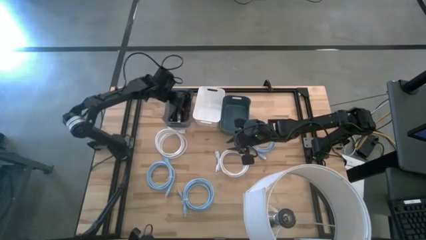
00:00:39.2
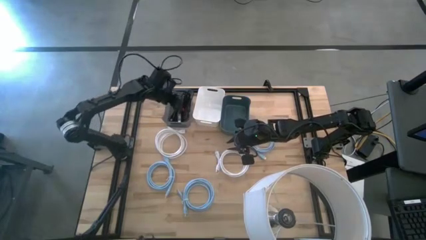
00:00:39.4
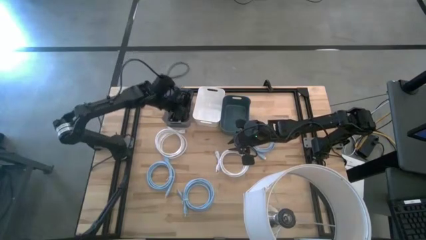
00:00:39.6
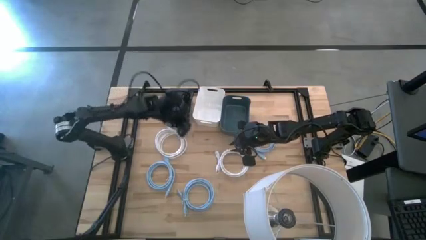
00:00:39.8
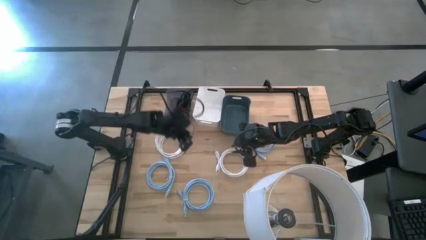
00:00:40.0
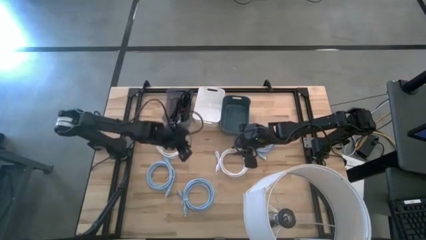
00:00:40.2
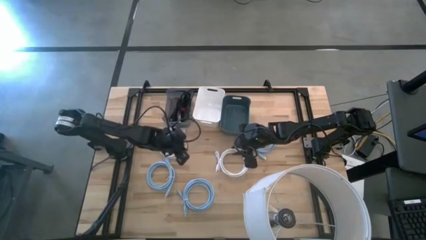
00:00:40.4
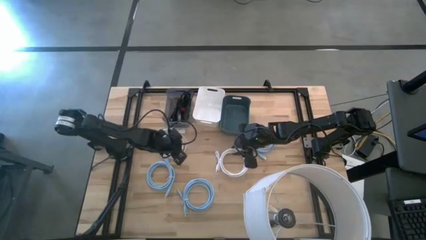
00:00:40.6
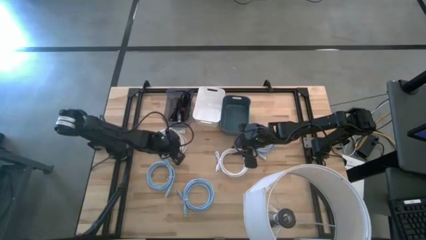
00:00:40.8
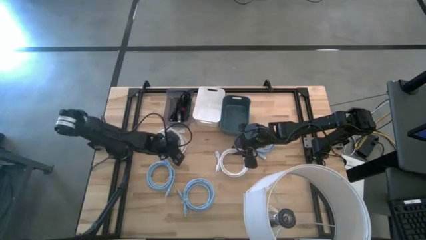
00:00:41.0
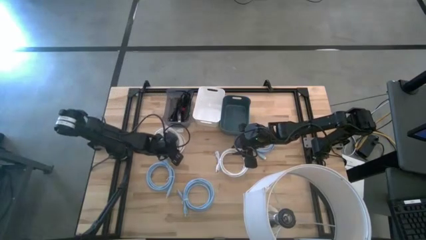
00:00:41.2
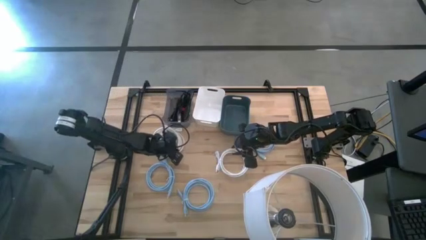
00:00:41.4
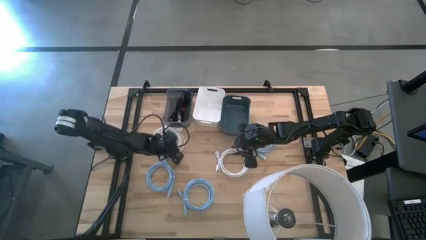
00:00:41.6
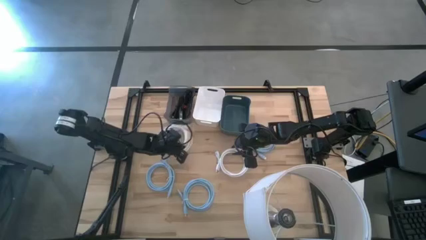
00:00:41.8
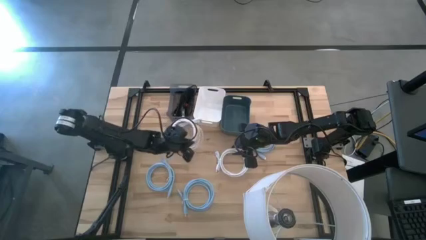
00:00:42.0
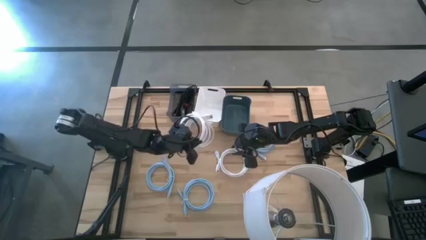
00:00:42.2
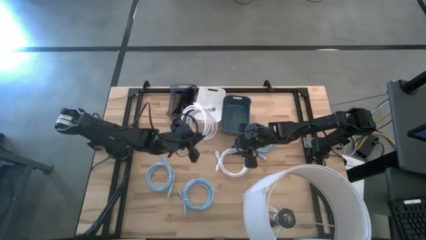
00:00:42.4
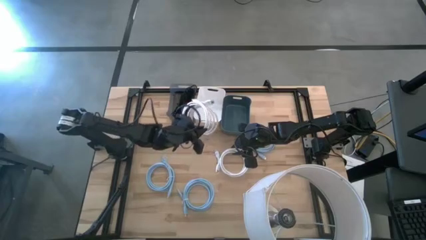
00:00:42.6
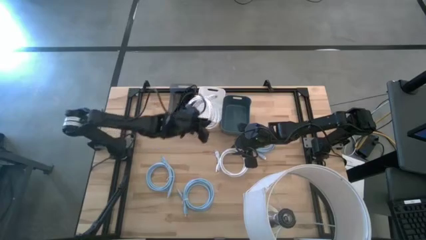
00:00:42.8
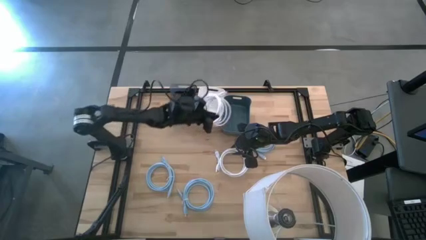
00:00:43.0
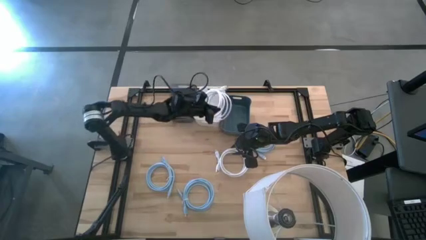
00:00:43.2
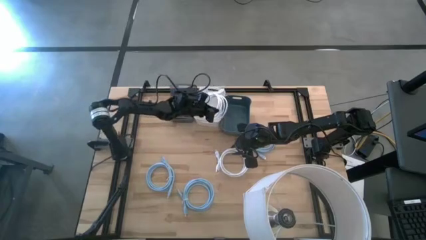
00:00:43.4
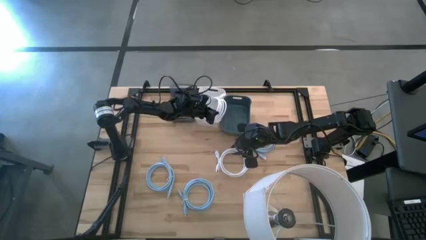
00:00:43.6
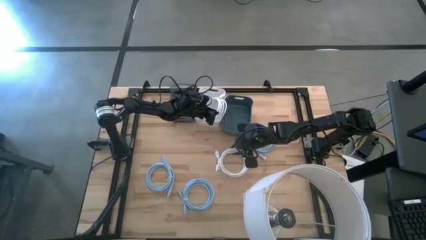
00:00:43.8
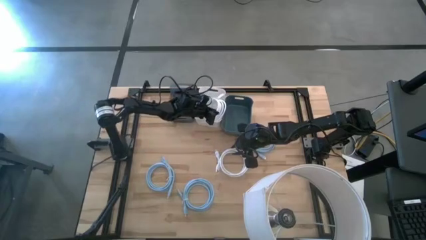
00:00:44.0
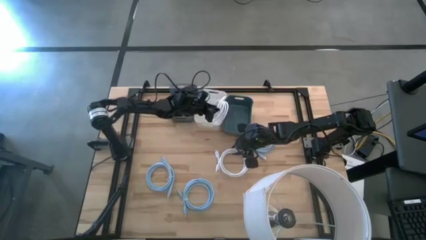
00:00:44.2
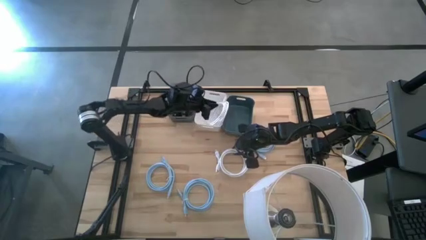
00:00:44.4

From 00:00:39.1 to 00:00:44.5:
Task: Pick & Place USB Port
Put the left white HDMI cable into the white bin

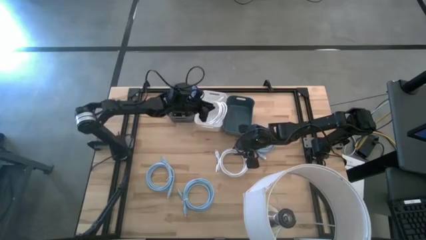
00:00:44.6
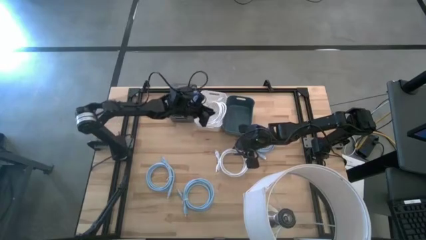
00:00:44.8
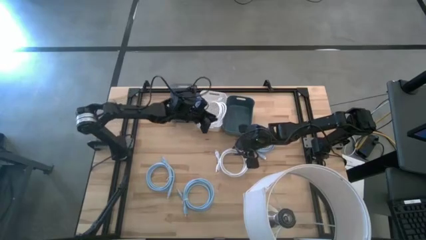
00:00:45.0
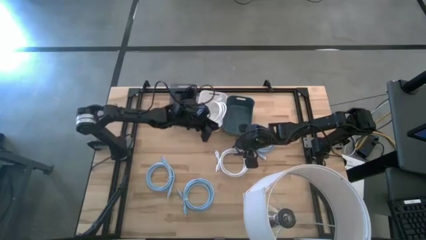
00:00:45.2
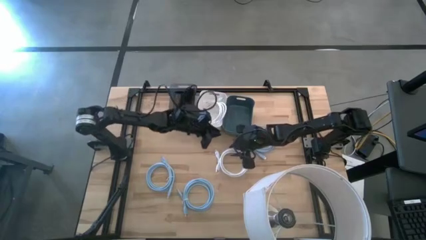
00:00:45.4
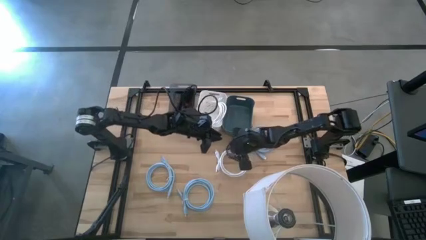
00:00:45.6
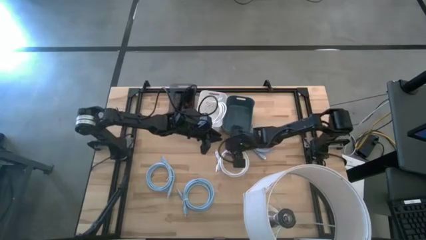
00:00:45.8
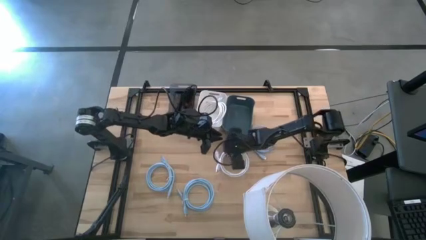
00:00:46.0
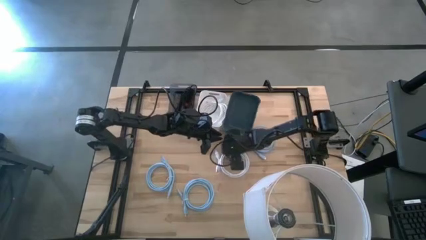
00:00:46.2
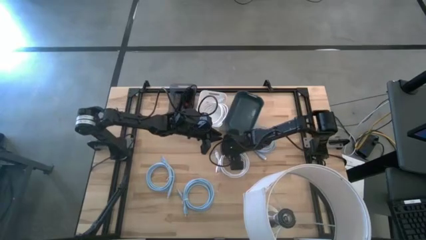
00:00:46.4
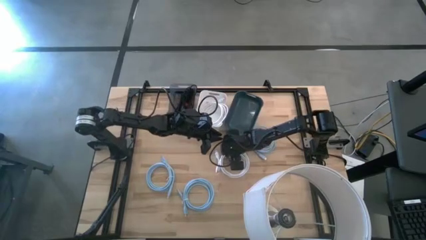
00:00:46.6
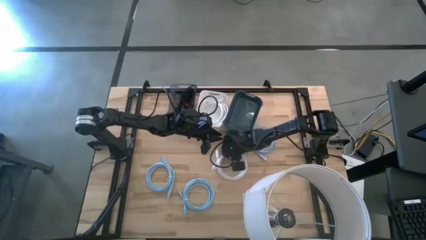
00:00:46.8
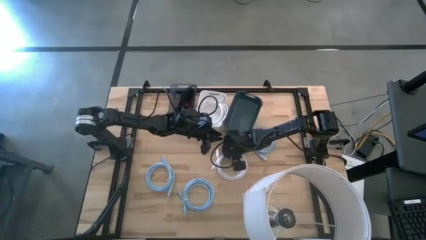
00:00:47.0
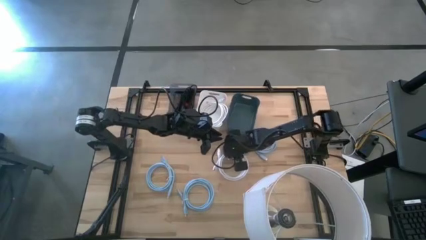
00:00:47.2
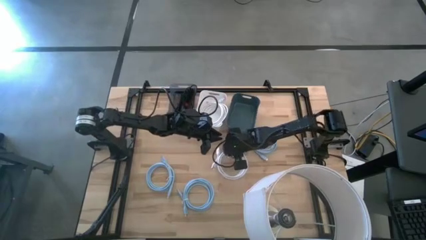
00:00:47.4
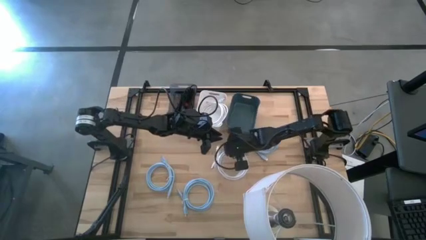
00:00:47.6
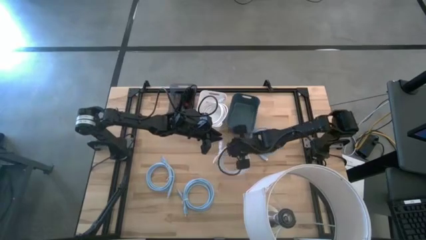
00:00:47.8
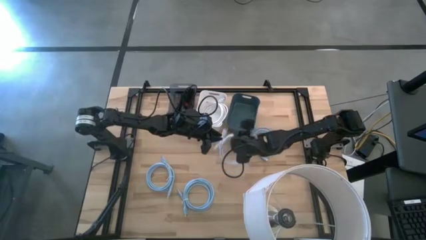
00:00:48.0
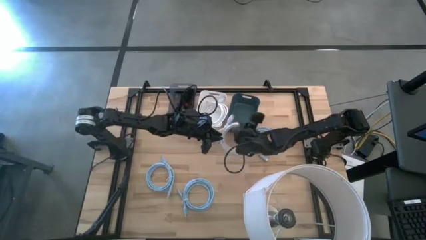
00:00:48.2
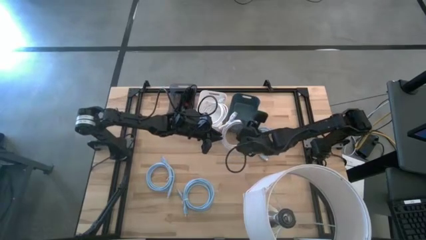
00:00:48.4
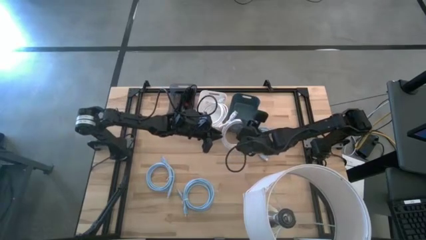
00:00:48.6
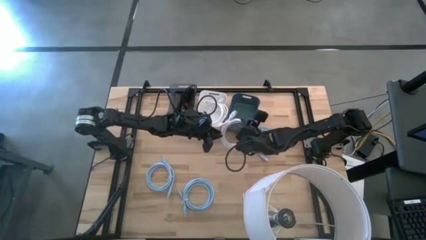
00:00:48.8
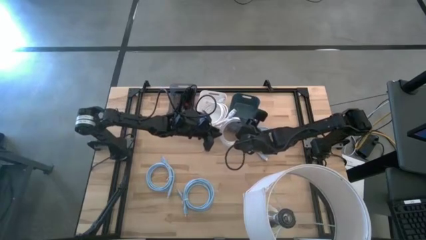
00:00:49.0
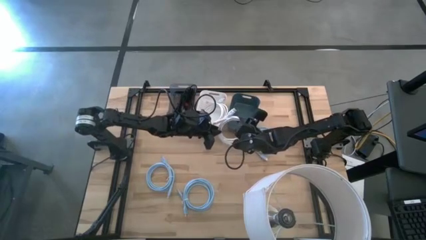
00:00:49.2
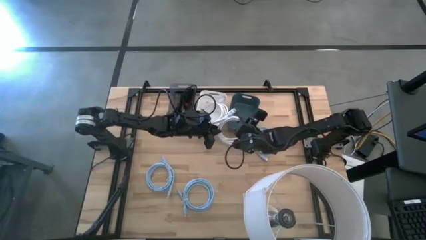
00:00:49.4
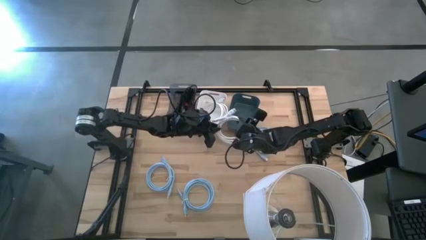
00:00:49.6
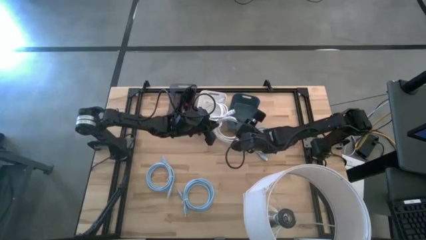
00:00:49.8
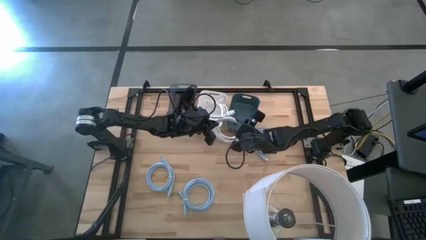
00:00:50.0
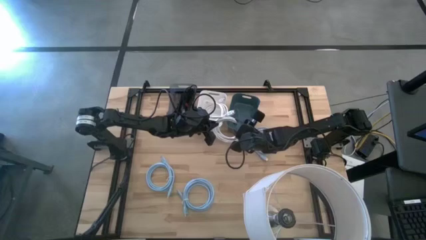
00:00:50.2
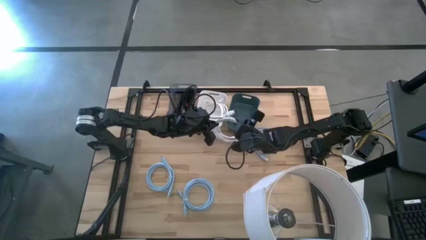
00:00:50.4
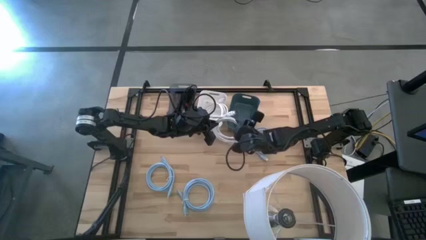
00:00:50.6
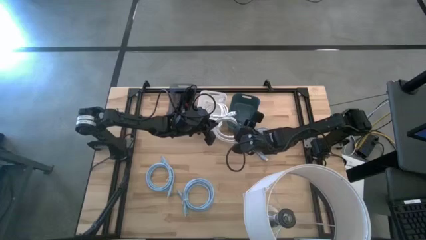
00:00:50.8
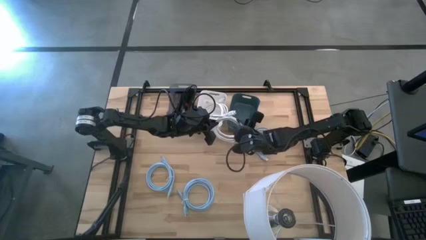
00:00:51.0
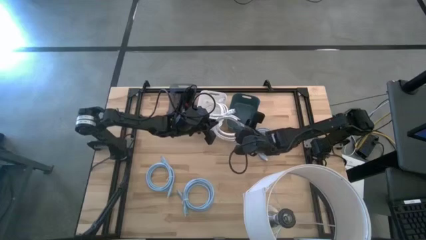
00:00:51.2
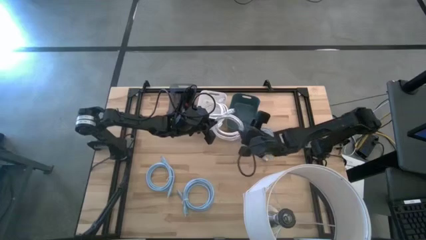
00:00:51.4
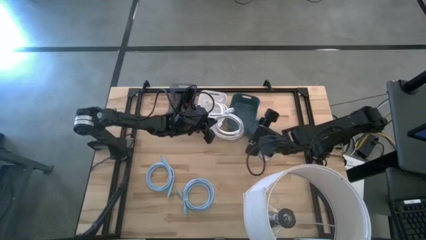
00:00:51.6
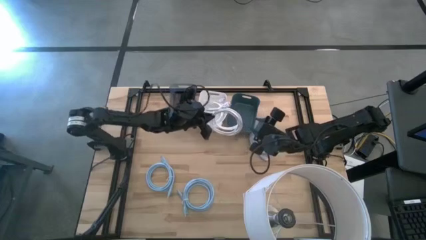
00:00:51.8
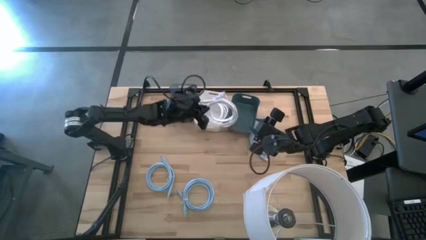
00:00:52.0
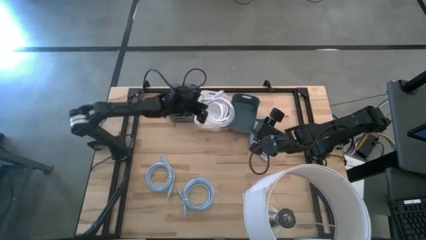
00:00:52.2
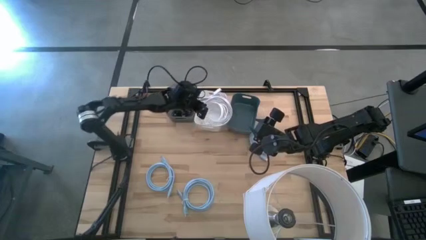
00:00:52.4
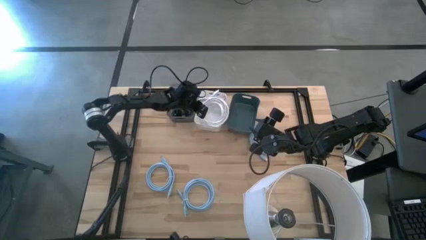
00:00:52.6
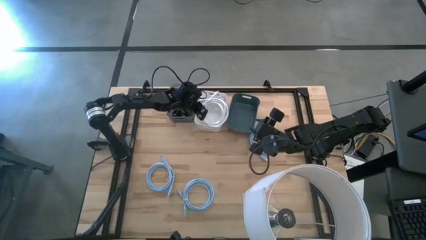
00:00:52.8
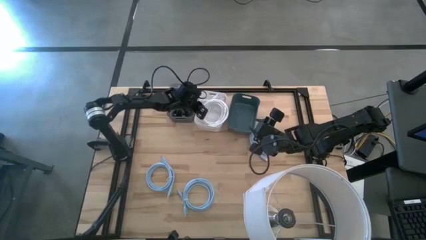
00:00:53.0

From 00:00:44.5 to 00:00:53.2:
Put the white HDMI cable into the white bin

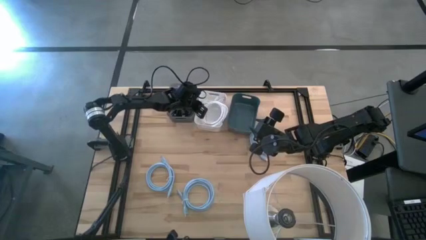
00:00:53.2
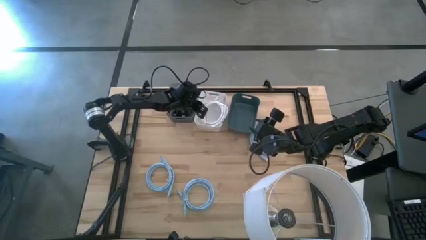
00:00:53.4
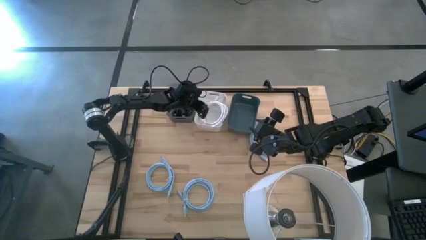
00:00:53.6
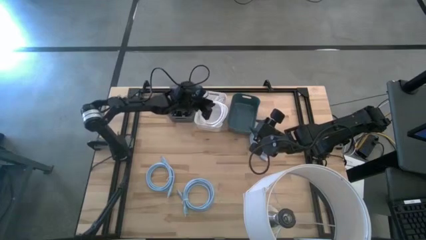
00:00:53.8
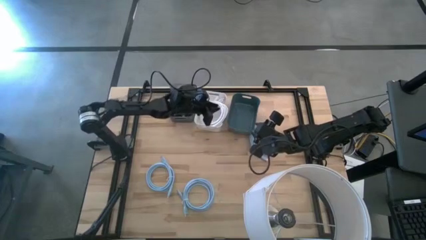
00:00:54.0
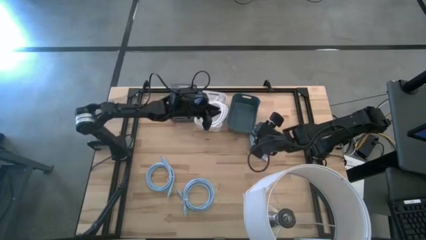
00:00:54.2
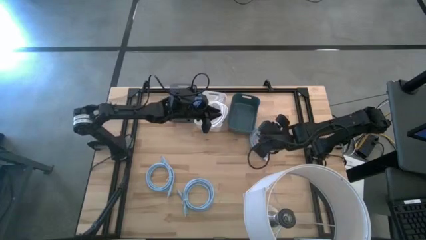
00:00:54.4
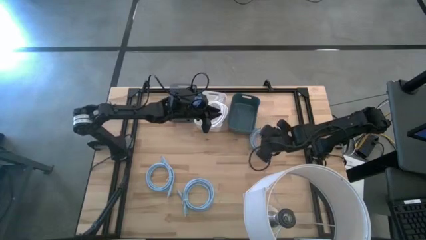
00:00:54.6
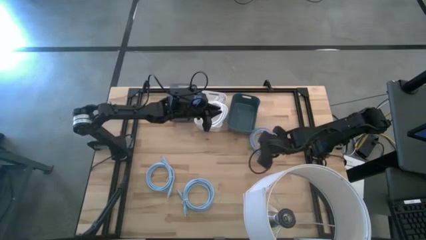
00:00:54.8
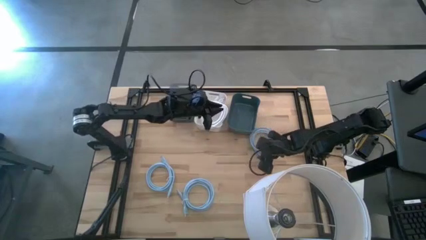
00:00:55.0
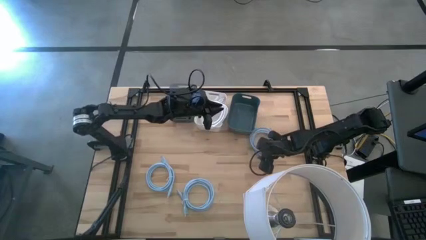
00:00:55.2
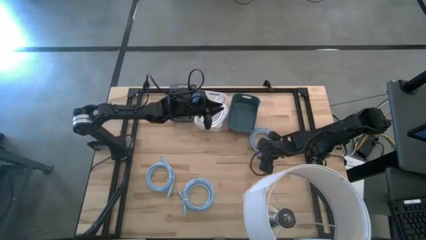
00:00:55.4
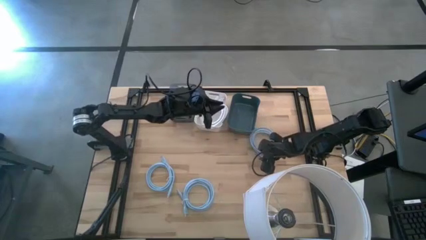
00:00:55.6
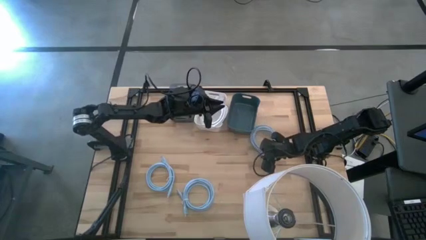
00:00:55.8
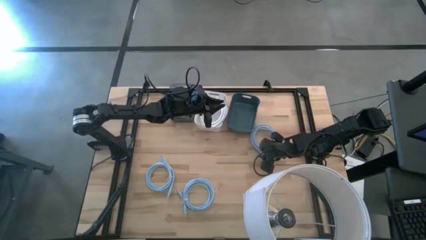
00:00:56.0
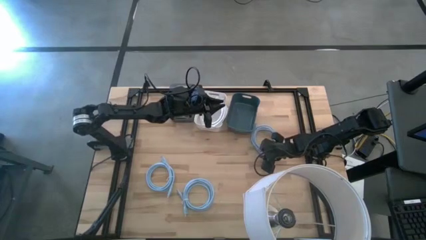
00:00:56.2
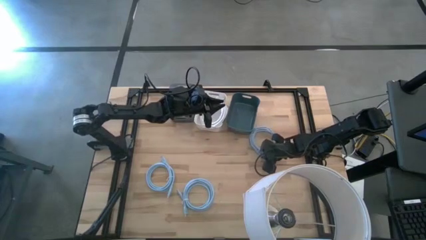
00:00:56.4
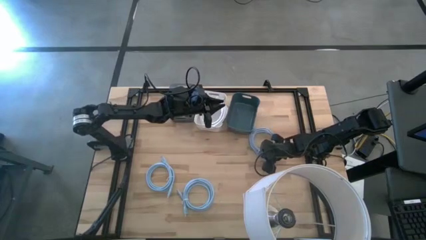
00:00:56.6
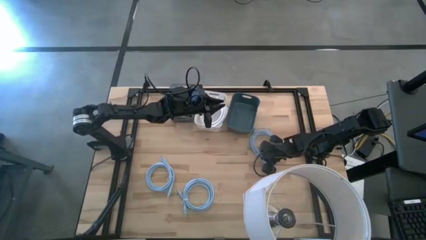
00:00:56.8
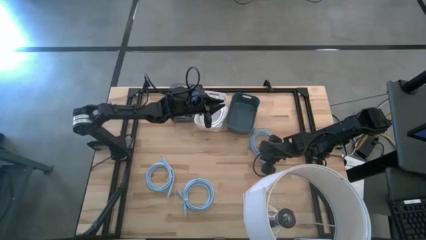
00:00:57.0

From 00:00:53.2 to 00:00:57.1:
Put the top blue HDMI cable into the blue bin
